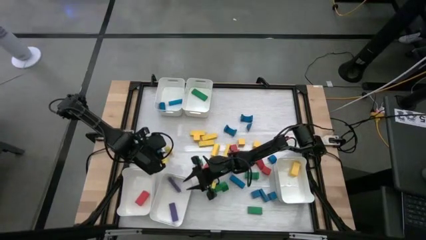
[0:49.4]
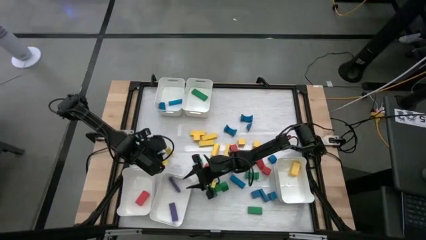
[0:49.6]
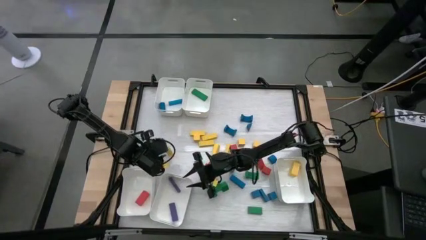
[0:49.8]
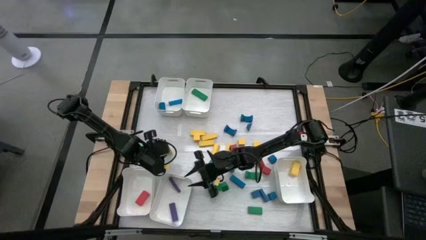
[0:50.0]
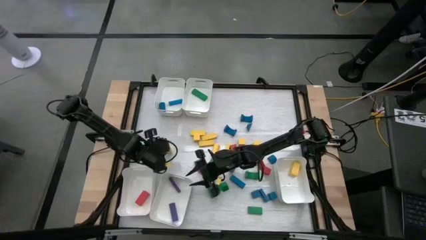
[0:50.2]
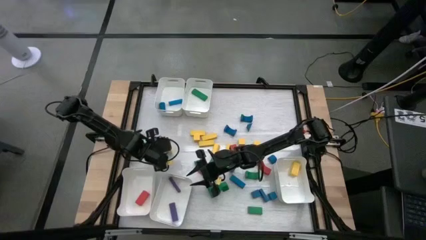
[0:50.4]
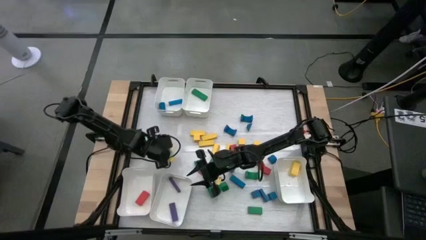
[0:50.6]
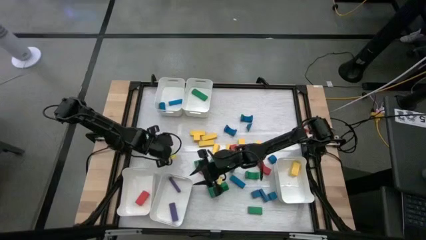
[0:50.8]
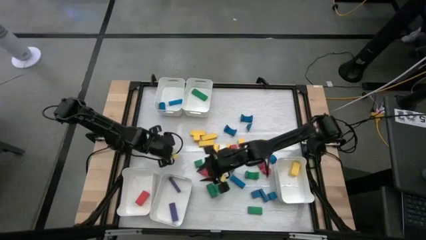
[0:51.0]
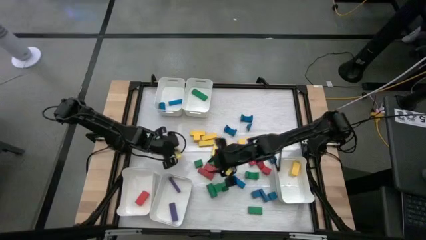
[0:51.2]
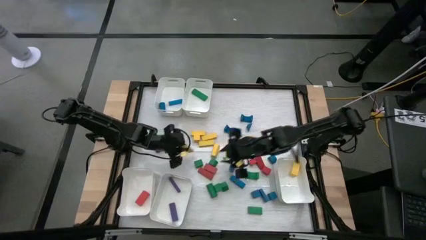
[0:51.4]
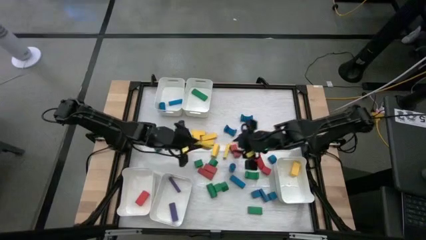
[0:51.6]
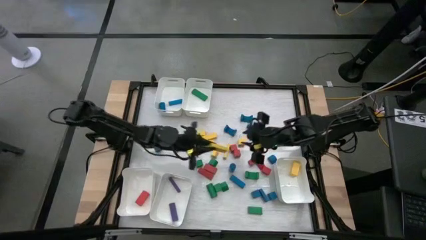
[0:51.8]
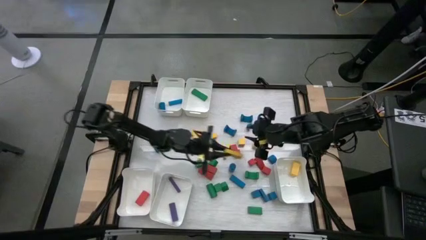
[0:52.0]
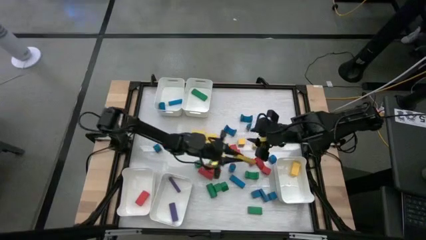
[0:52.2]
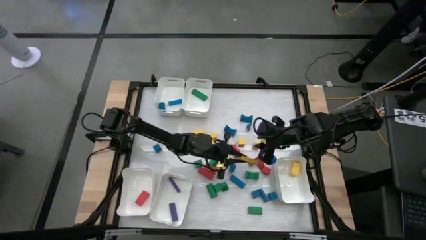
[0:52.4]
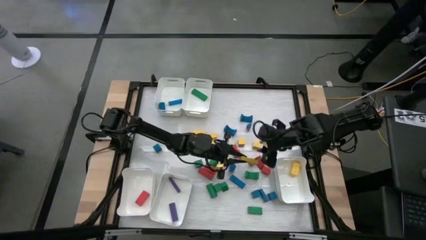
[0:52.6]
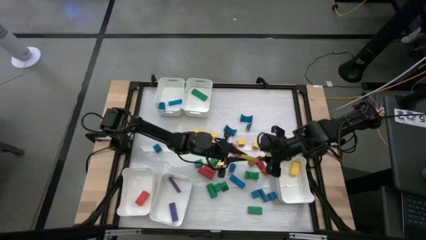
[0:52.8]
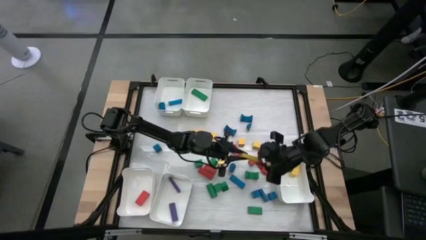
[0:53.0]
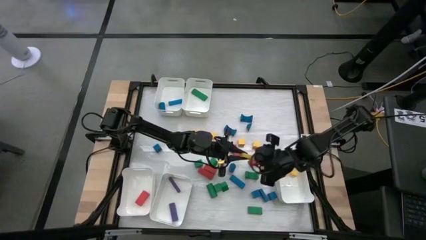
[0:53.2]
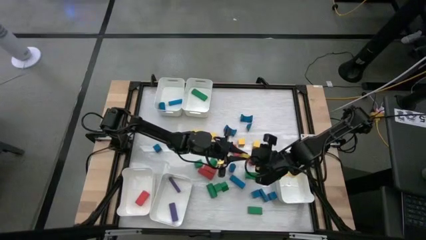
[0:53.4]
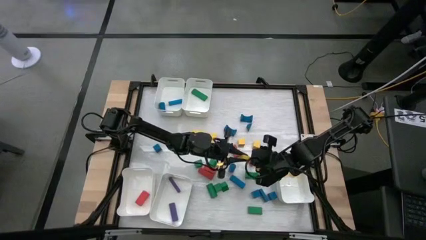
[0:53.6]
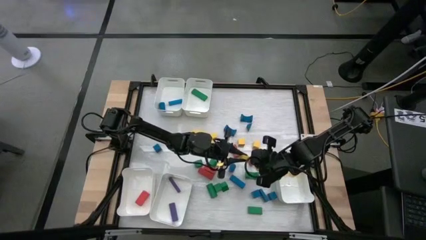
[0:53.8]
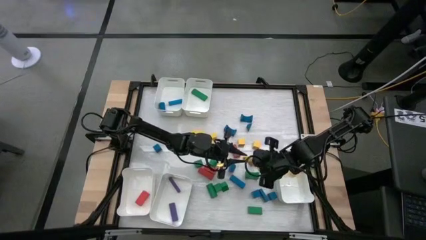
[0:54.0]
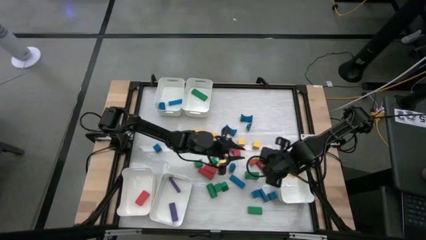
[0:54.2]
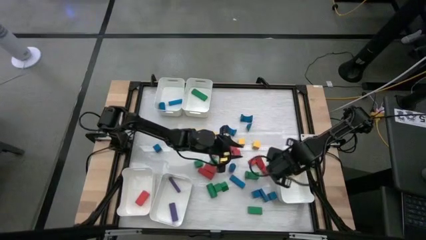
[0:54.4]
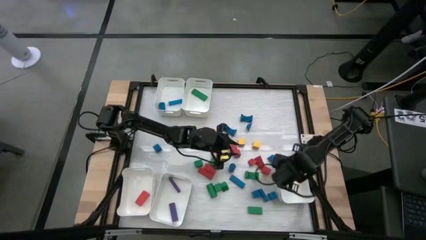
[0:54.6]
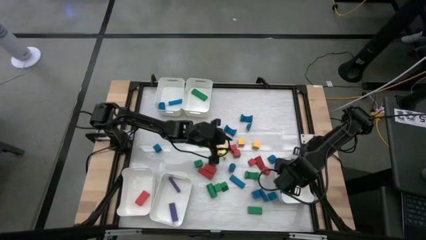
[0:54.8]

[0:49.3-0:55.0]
Task: Sort blocks
Put the yellow block into the bottom right white bin

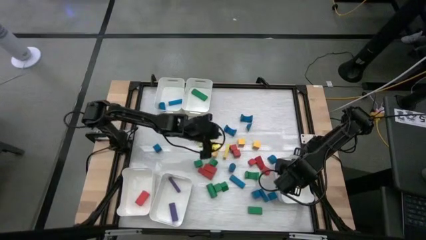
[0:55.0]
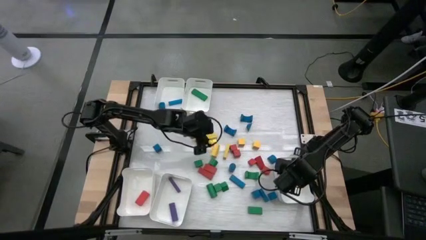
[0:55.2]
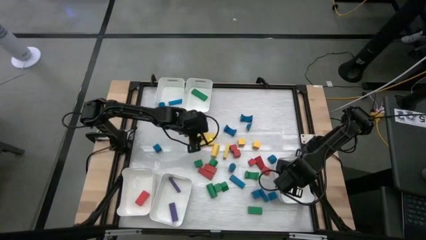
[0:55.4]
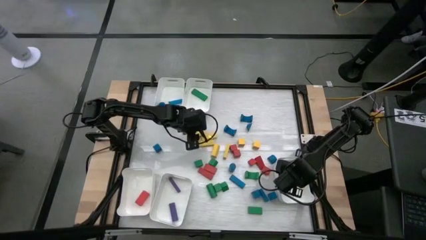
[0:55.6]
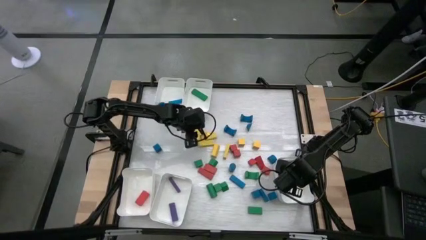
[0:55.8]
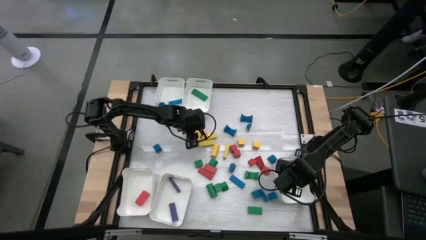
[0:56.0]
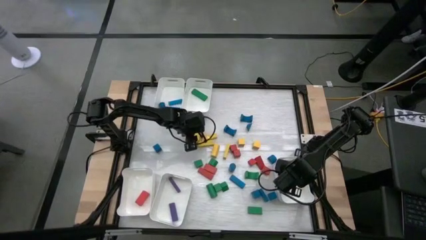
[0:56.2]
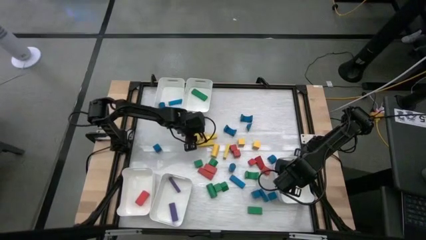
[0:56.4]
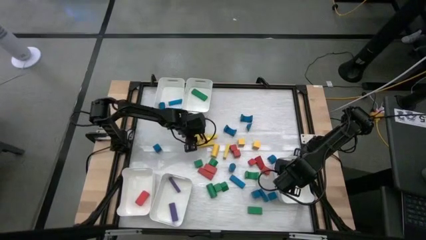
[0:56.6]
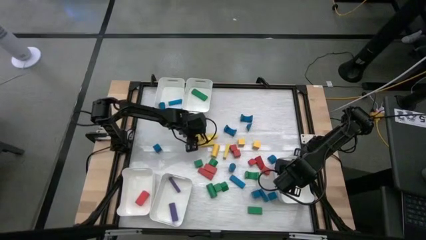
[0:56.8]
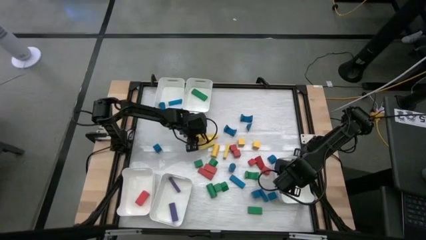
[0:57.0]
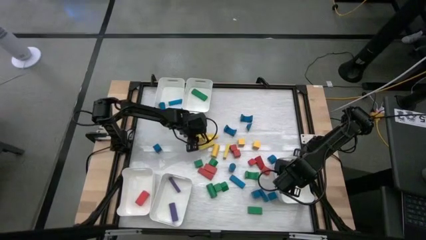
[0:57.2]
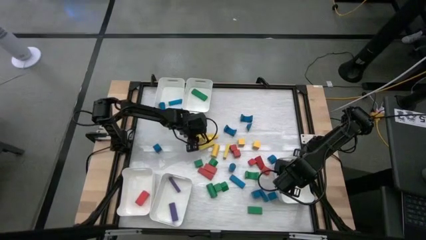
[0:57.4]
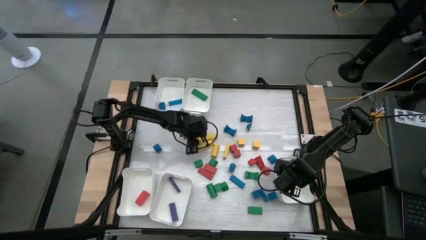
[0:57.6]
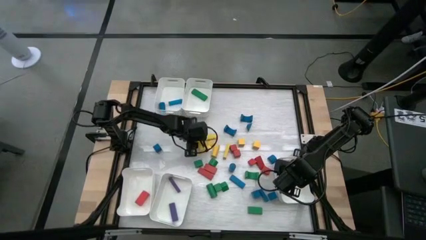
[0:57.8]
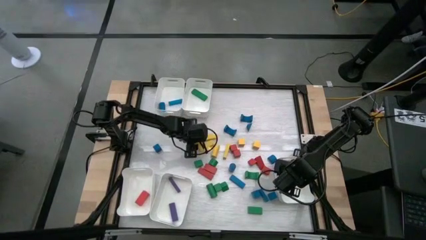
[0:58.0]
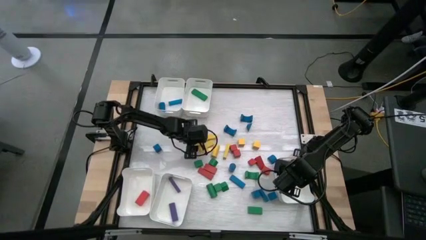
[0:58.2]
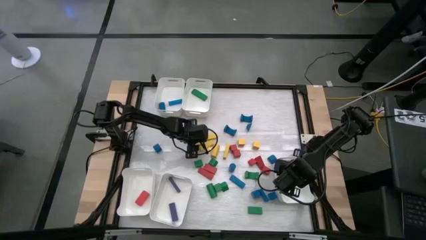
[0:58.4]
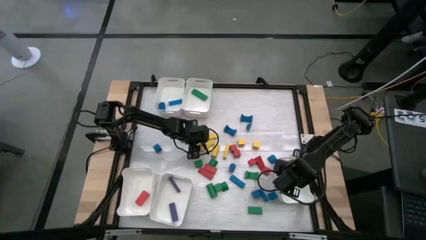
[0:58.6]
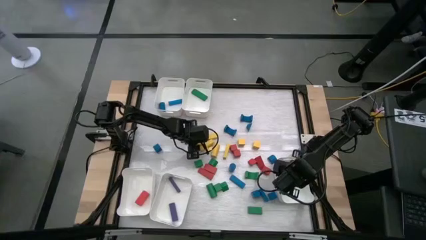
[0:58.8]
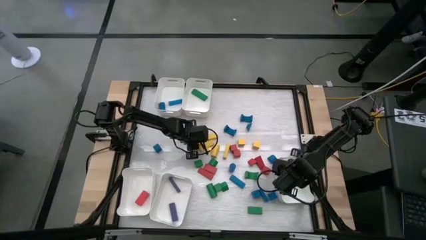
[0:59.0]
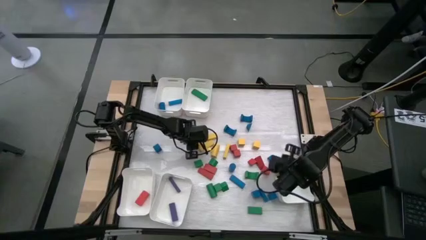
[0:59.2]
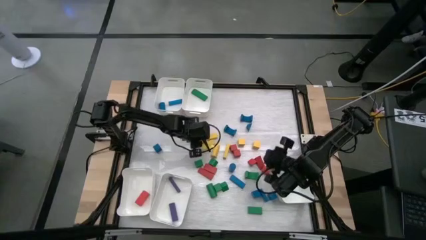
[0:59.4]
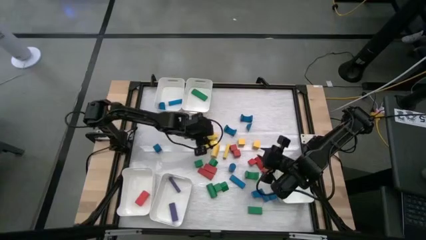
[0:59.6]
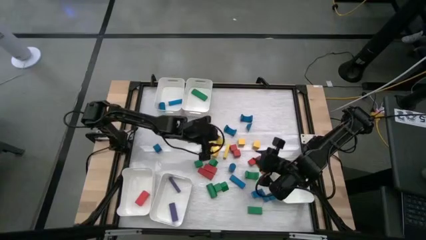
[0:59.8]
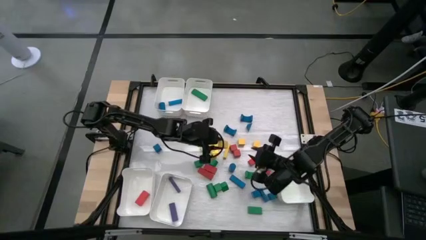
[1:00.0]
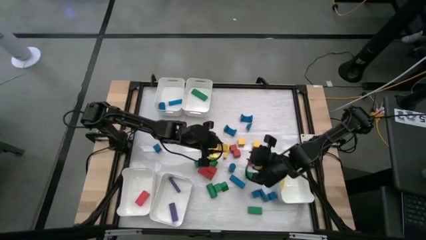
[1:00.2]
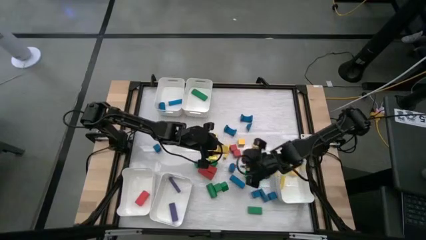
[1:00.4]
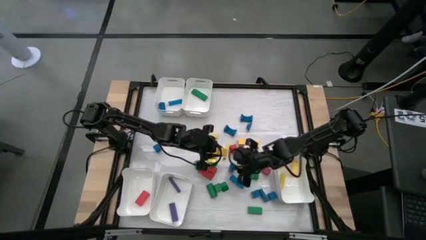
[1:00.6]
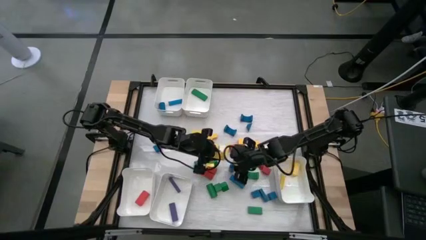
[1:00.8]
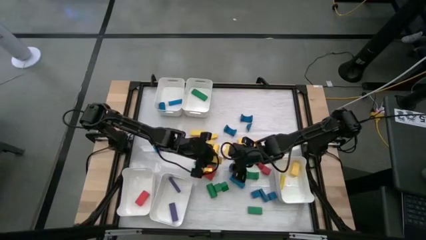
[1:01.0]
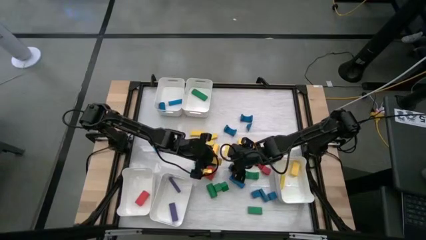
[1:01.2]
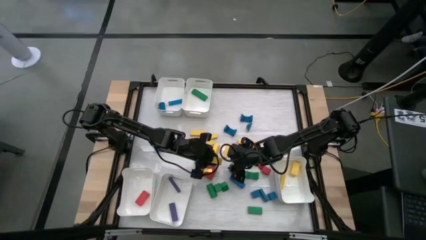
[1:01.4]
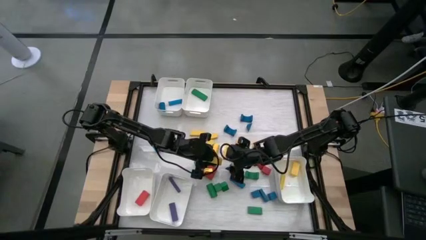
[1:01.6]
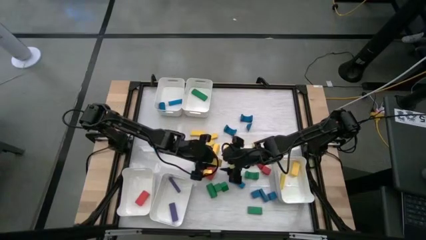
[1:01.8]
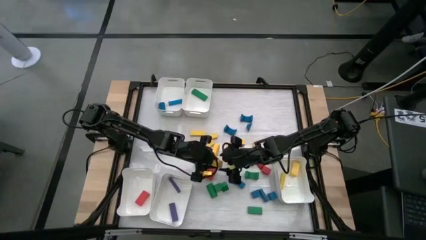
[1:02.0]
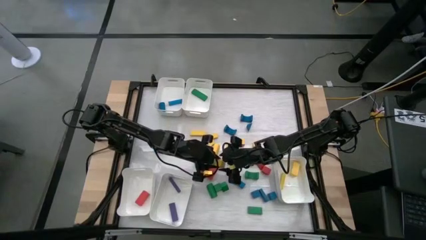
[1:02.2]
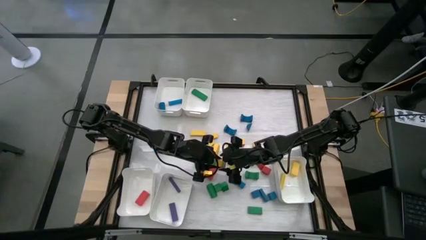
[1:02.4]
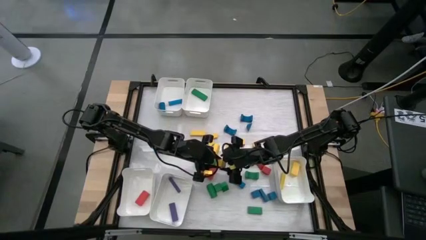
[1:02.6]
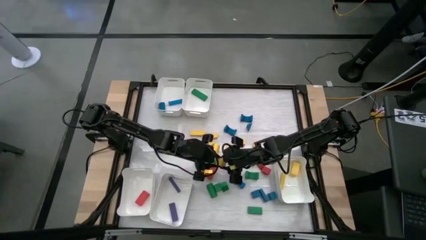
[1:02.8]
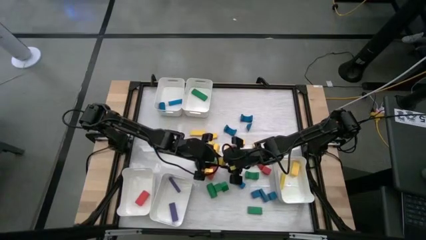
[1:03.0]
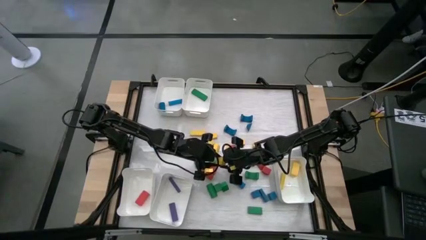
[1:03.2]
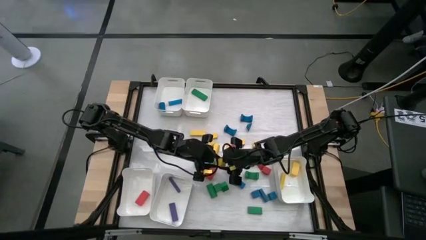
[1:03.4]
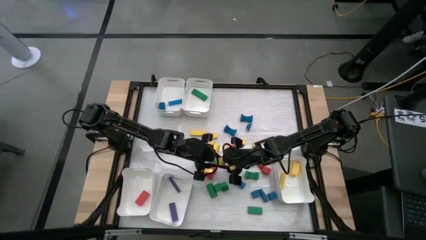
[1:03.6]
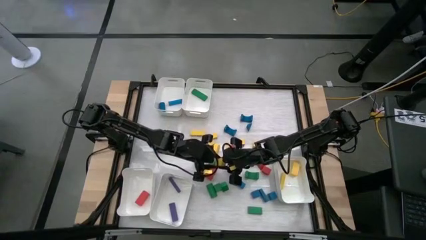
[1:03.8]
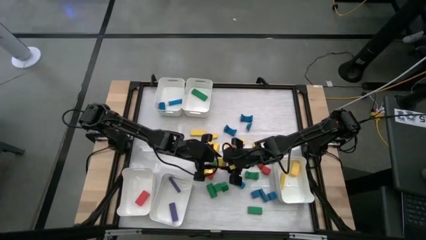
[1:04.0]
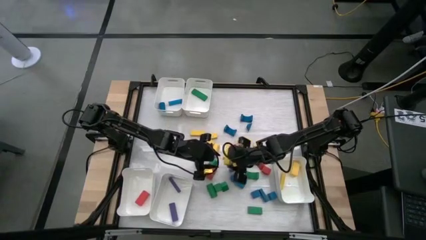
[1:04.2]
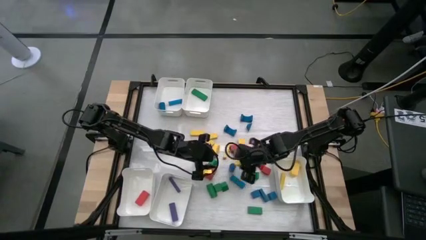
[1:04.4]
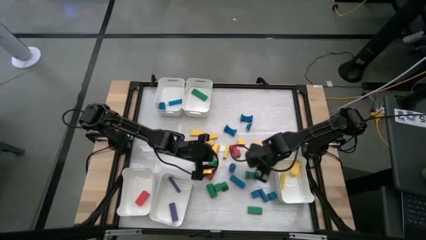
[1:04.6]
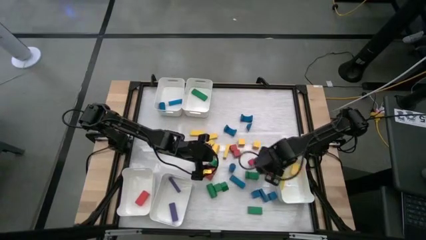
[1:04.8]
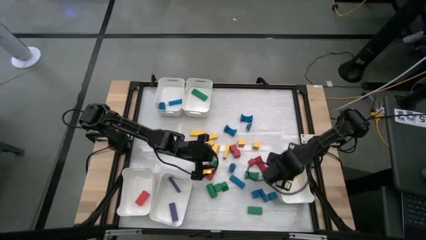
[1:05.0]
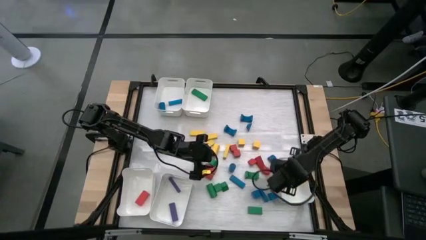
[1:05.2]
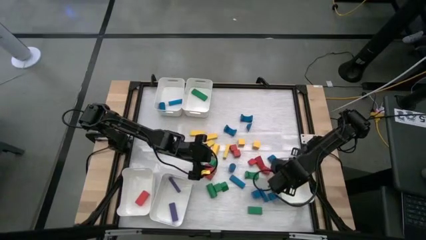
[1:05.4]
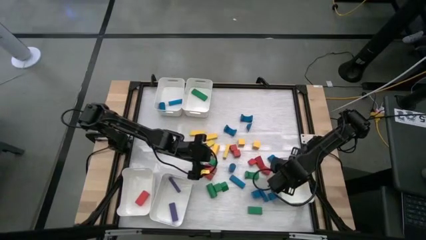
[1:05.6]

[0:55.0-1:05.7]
Put the yellow block into the bottom right white bin

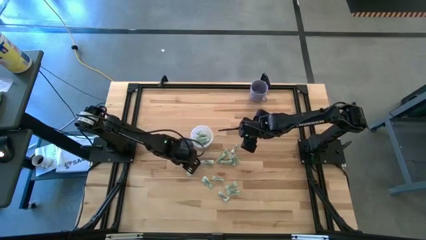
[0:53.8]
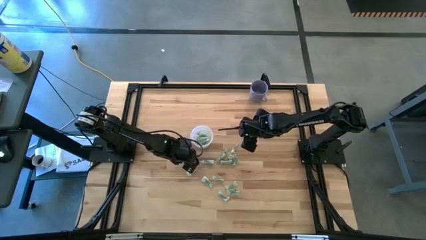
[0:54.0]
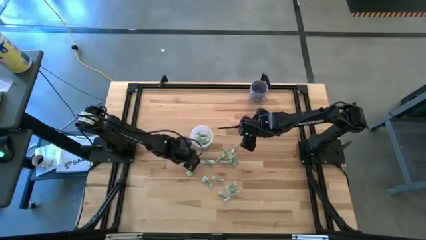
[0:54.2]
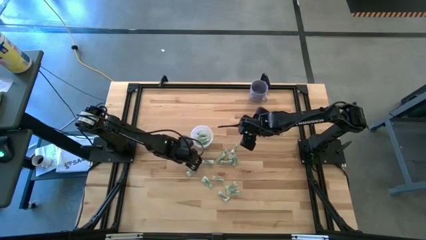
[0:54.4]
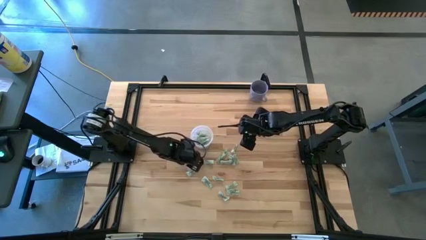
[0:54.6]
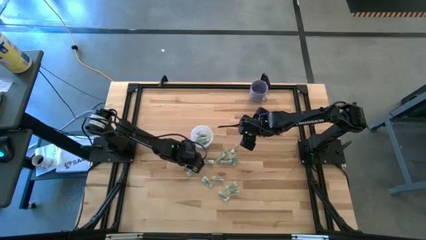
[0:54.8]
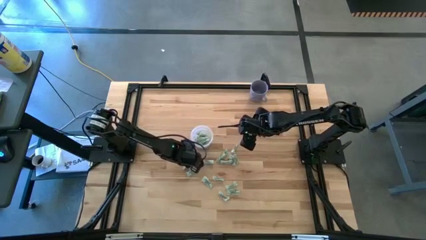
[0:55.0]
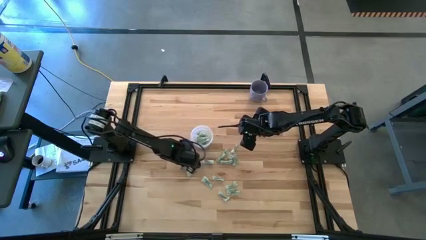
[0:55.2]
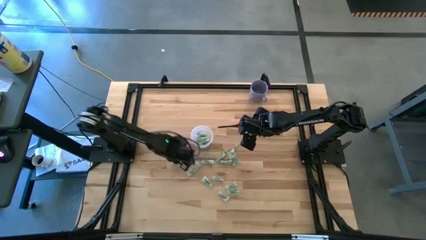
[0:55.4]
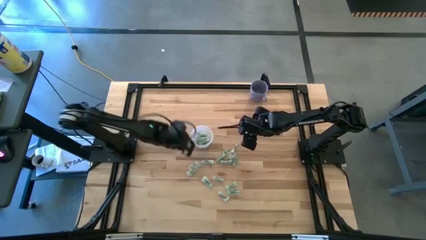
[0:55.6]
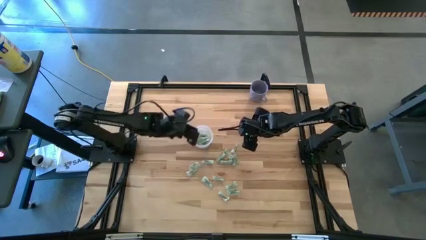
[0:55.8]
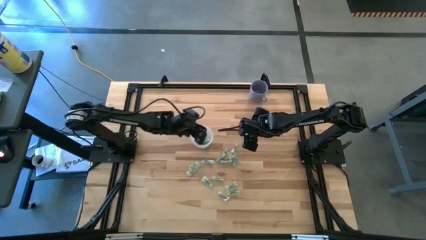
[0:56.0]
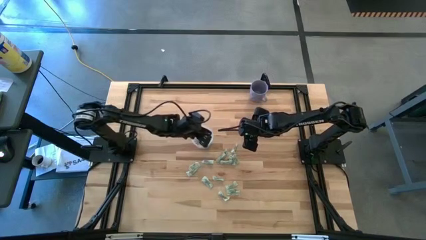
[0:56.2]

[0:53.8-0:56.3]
Task: Pick and place Stevia / Truvia into bins
Put the white stevia packet into the transparent container
